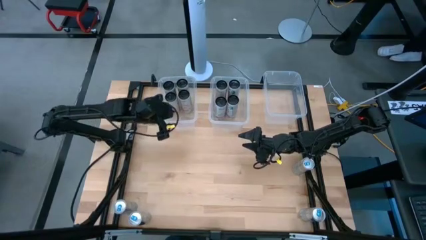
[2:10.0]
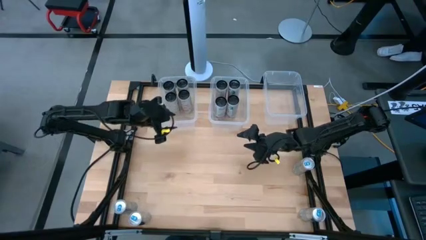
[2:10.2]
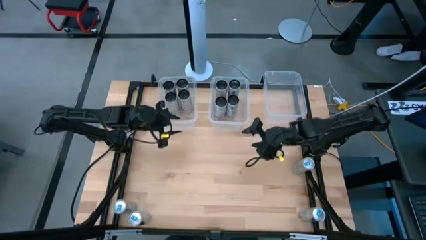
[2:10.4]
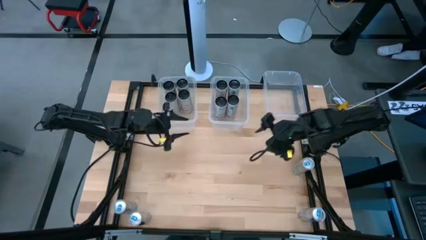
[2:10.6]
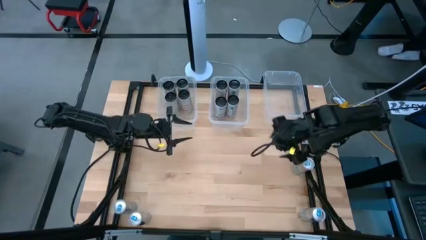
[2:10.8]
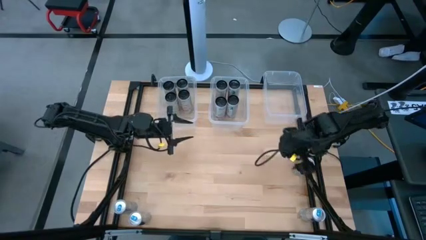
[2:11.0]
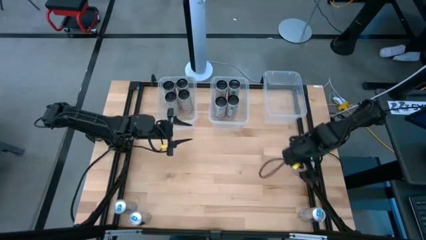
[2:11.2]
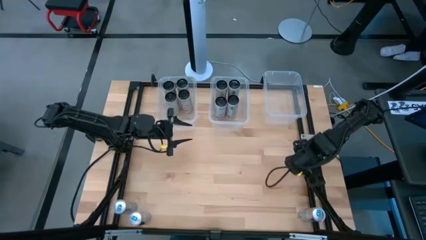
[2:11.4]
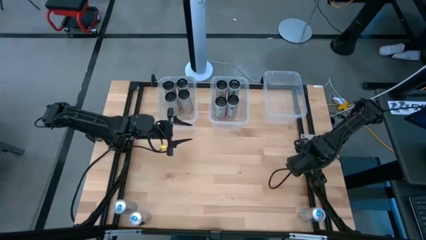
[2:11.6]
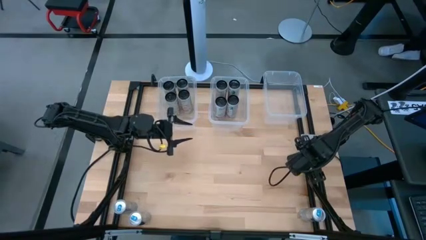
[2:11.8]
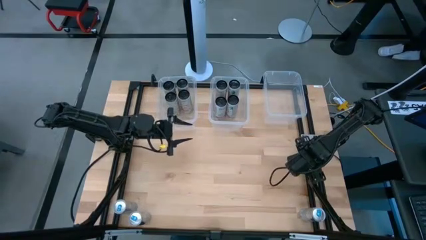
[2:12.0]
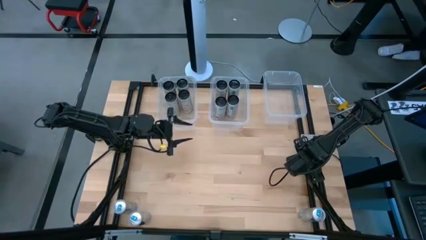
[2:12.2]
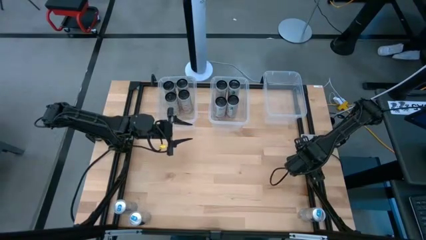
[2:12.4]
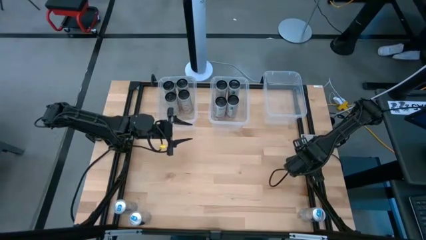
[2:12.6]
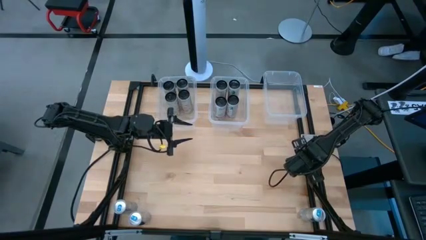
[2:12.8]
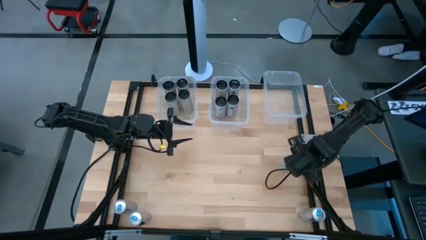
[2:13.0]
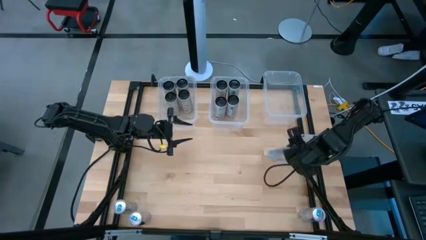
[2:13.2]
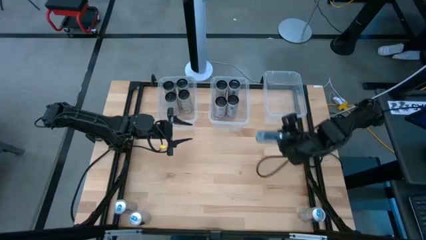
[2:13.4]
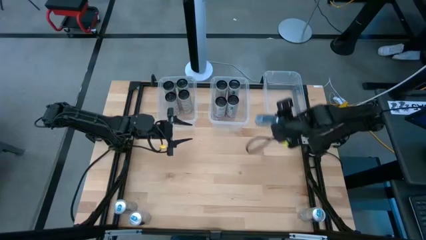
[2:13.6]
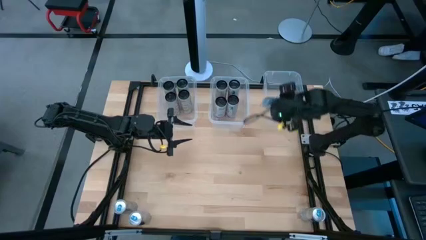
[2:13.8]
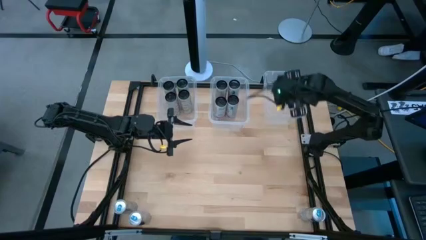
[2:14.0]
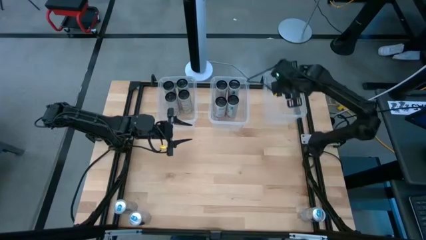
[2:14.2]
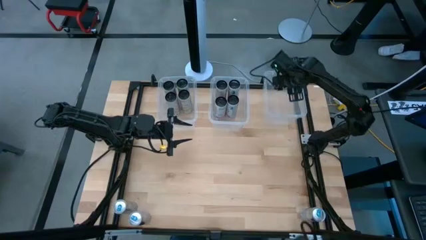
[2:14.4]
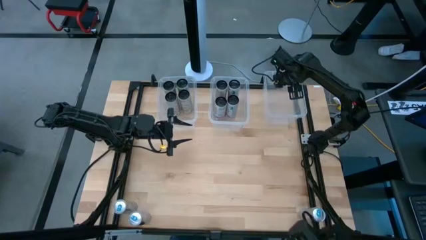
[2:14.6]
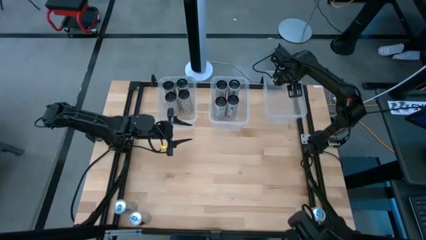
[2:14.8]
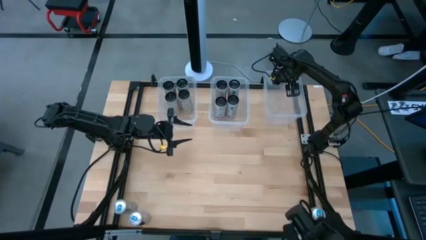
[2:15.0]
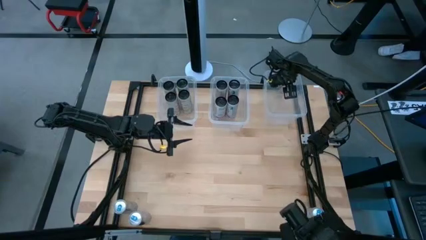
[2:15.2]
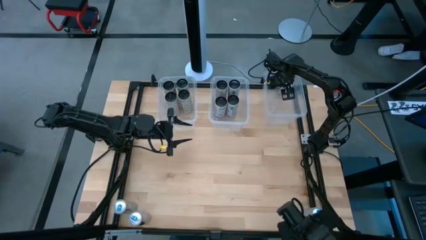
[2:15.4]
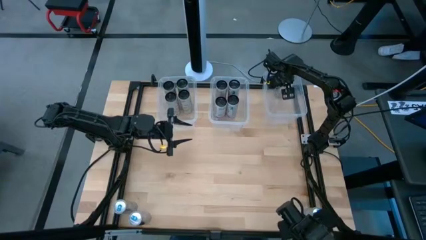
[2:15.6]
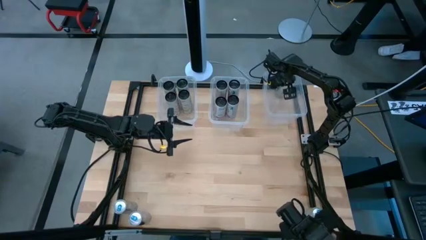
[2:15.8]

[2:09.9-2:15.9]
Task: Sort soda cans
Put the top right white and blue soda can into the right transparent bin

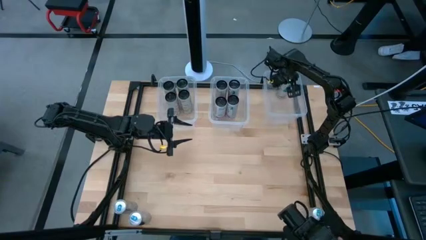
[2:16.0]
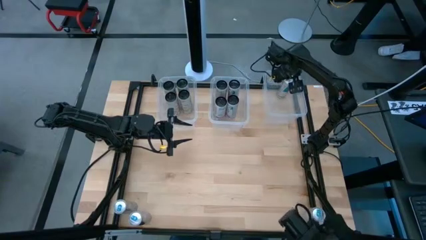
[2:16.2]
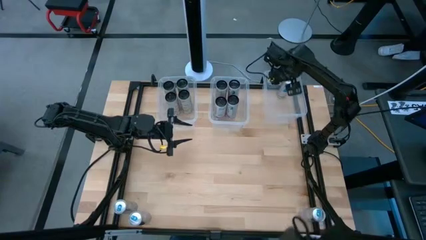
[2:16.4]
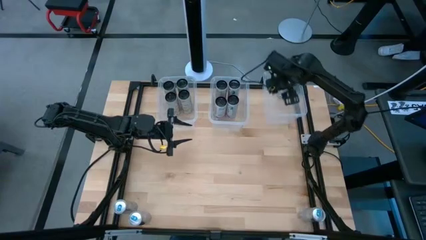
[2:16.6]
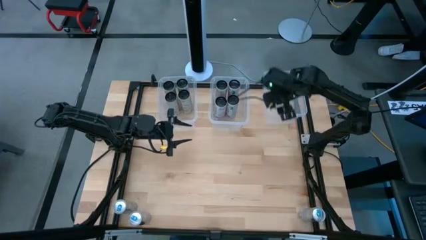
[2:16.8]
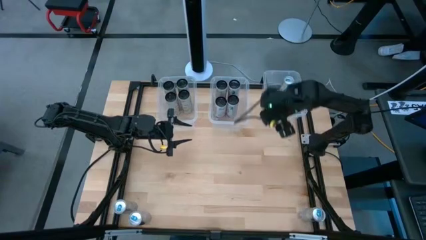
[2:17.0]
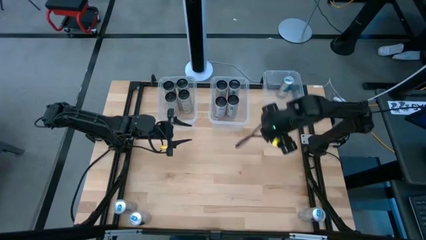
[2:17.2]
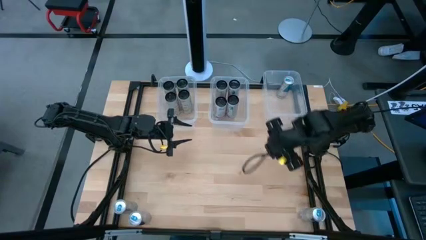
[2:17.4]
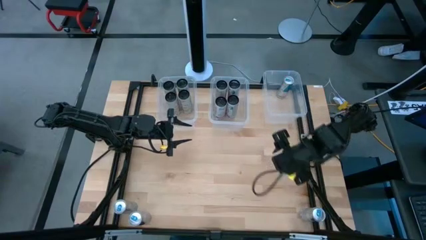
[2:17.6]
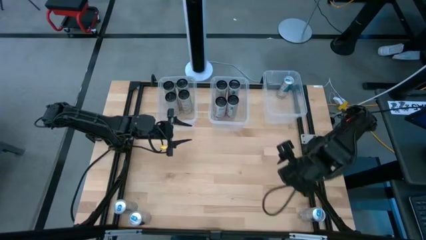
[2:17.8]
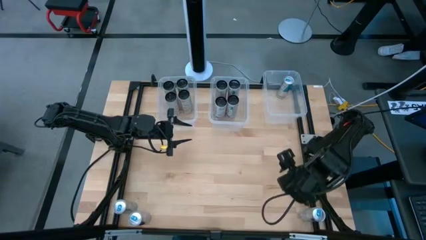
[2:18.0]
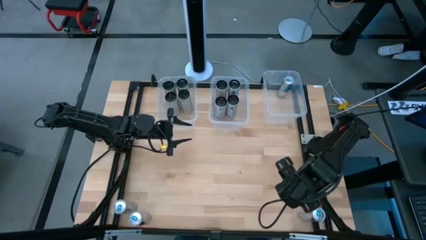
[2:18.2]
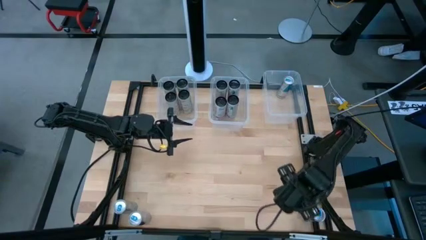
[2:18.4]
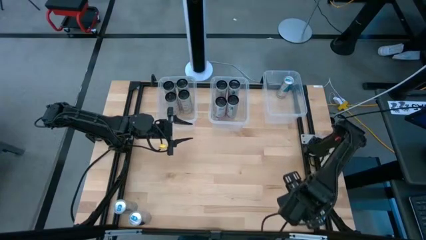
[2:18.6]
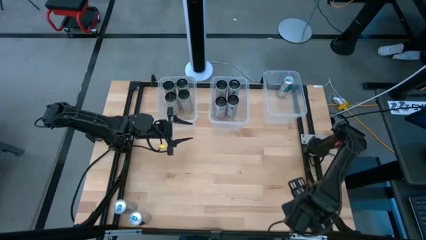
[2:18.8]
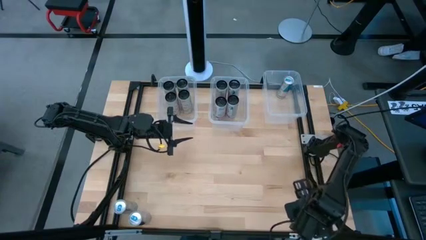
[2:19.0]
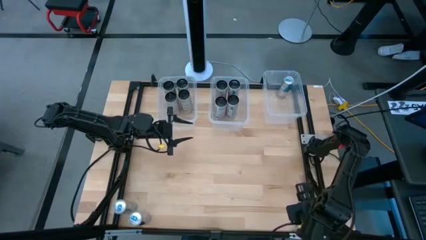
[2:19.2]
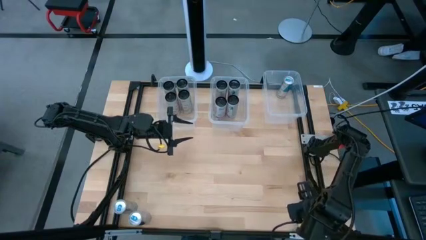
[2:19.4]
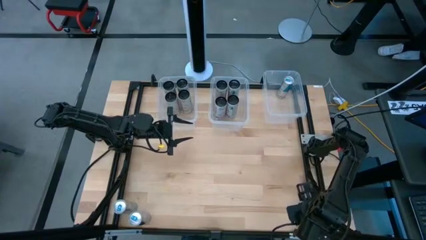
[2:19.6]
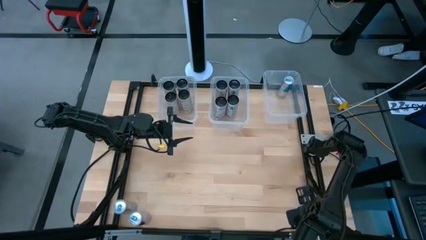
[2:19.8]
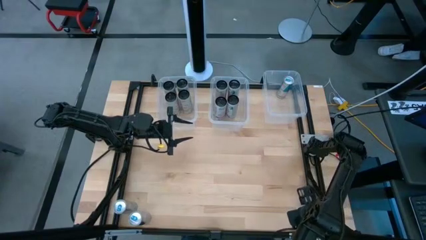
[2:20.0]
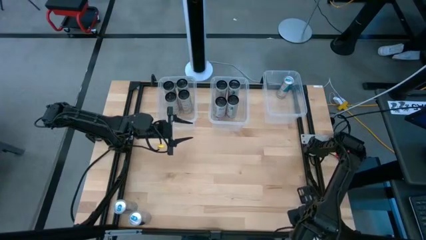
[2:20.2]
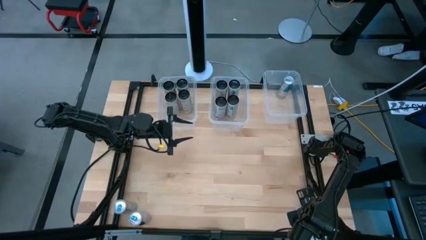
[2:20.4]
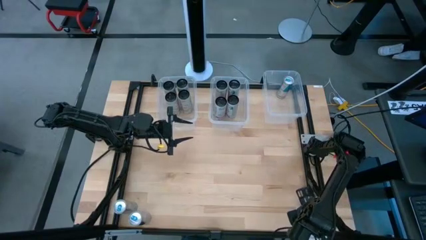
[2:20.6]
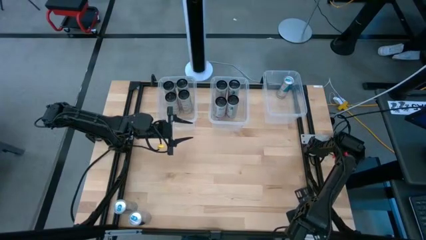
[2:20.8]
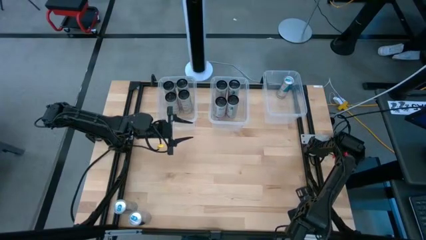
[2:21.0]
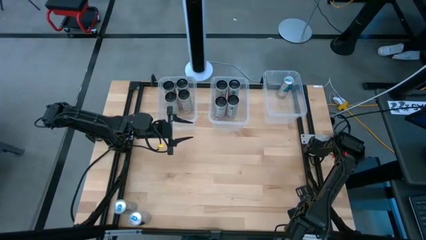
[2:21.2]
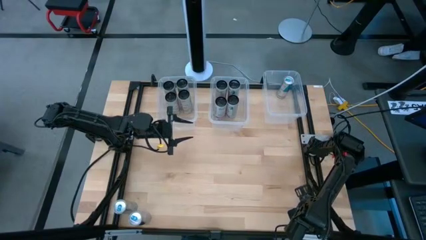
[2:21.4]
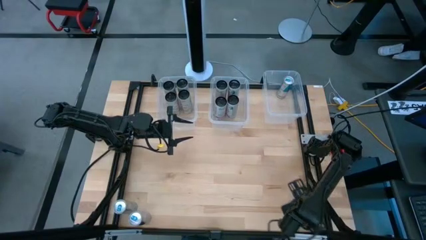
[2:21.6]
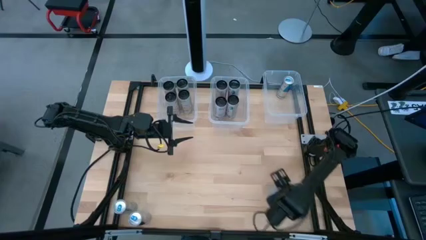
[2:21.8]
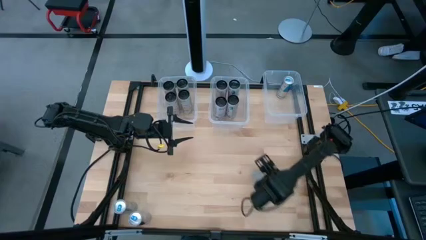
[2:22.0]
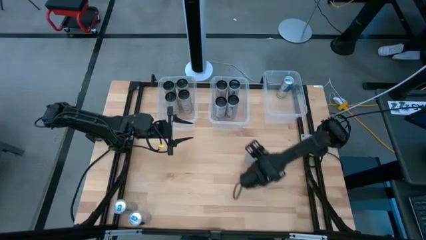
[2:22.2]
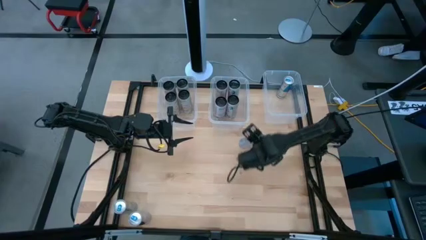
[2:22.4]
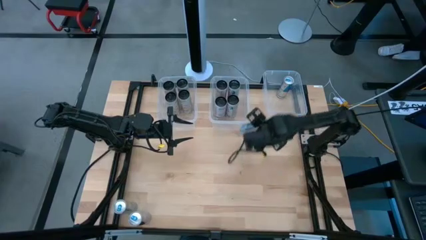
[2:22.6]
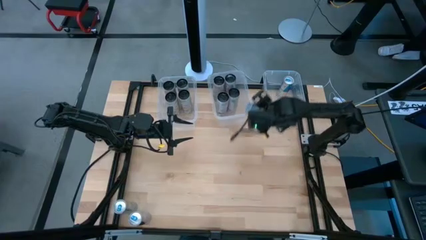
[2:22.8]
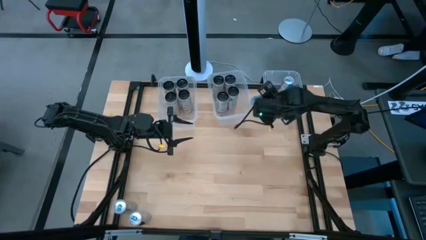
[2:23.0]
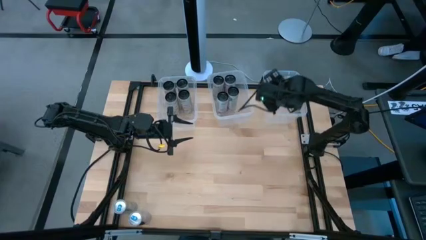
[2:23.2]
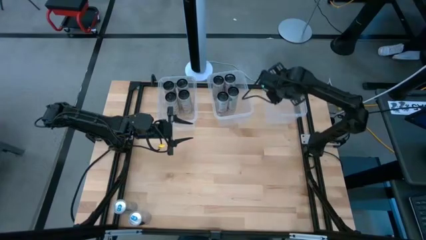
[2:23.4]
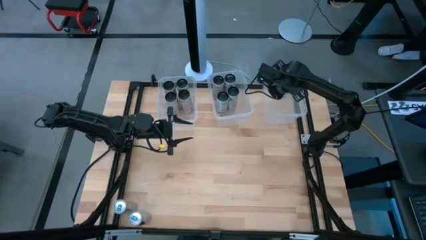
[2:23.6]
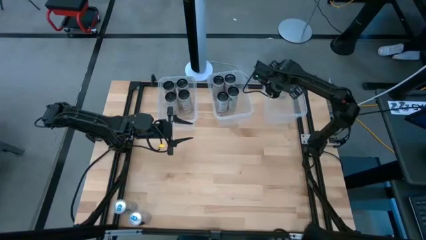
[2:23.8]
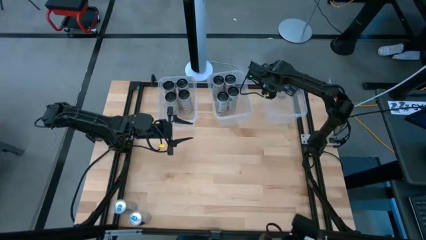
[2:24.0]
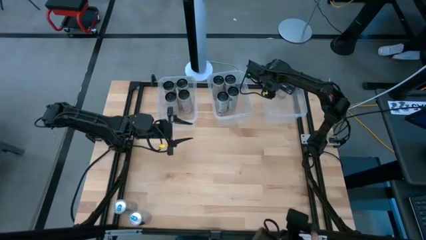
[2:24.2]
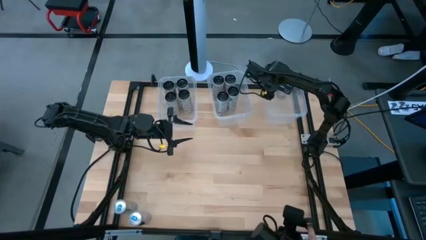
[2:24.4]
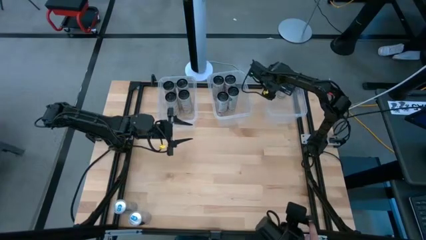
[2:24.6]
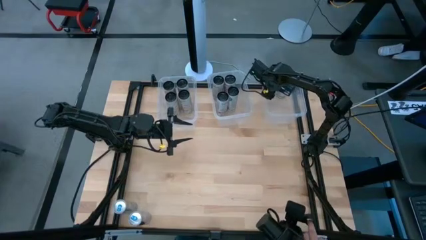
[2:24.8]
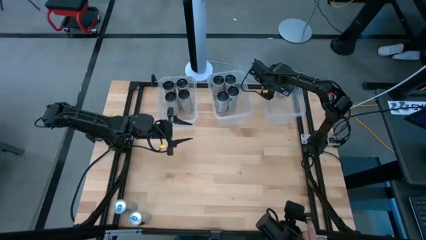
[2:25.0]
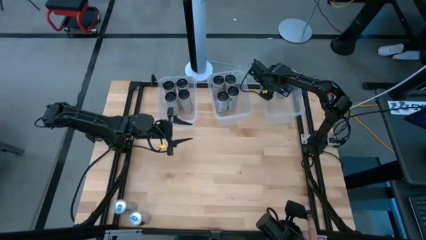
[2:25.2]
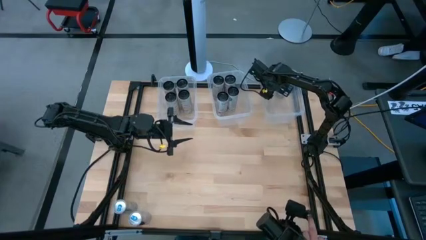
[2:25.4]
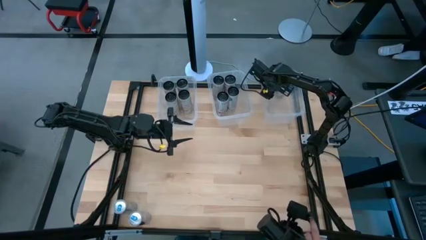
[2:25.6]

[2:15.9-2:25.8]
Put the far right white and blue soda can into the right transparent bin

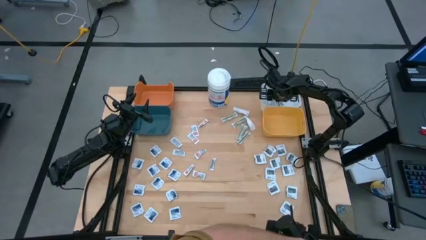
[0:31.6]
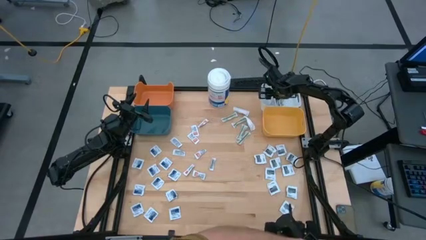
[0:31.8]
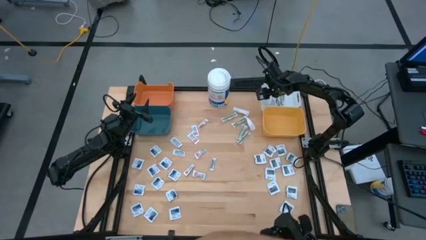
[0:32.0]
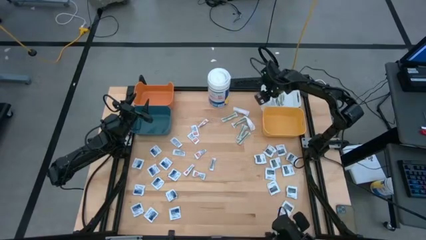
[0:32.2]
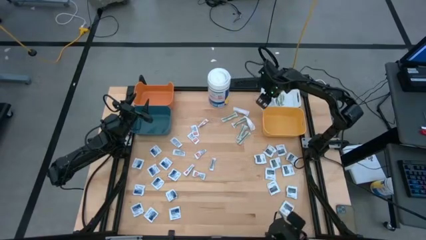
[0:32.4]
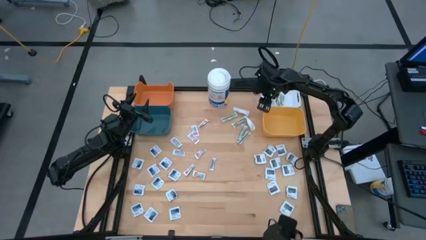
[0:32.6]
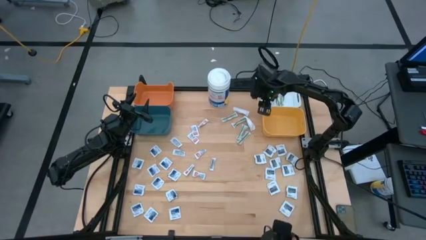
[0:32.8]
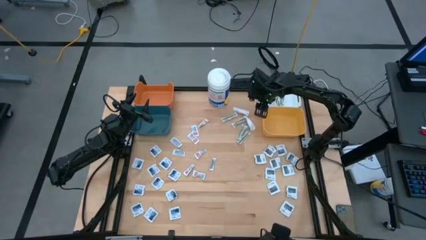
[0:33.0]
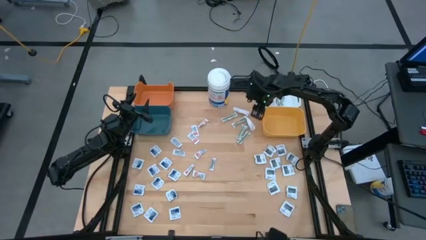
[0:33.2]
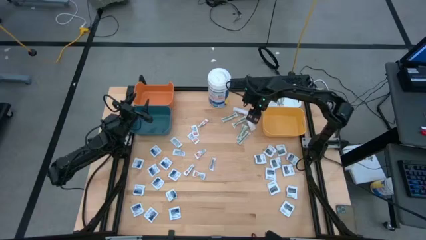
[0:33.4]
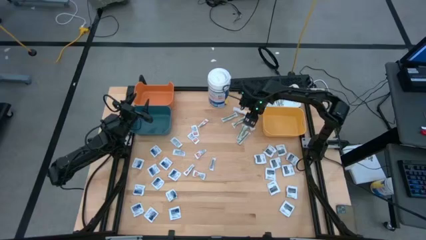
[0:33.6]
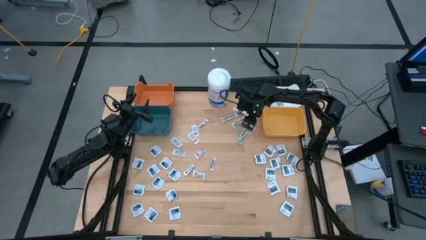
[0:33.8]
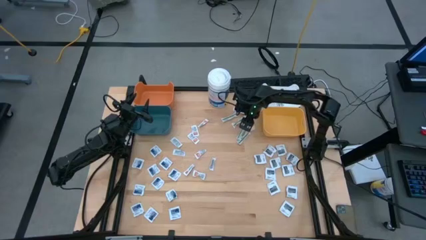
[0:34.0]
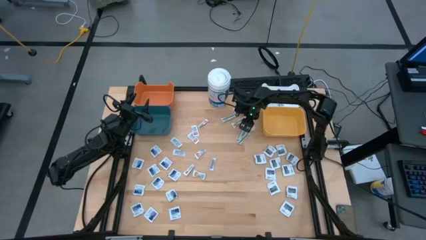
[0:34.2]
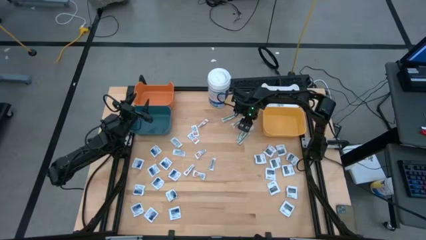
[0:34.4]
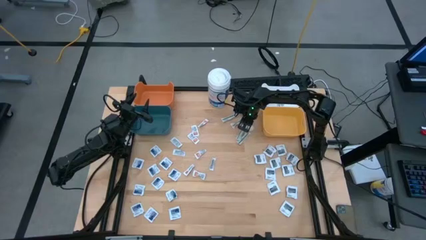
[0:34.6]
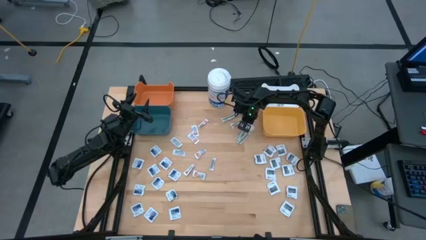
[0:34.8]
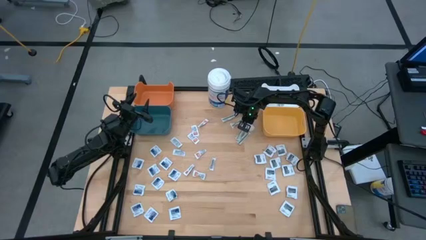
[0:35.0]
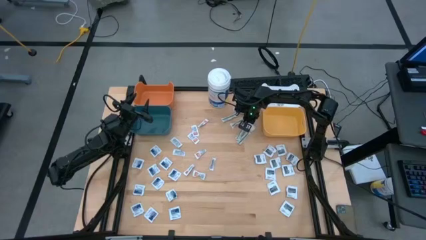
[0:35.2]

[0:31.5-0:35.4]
Task: Pick & Place First Aid Supplies
Put the green bandage into the white bin
